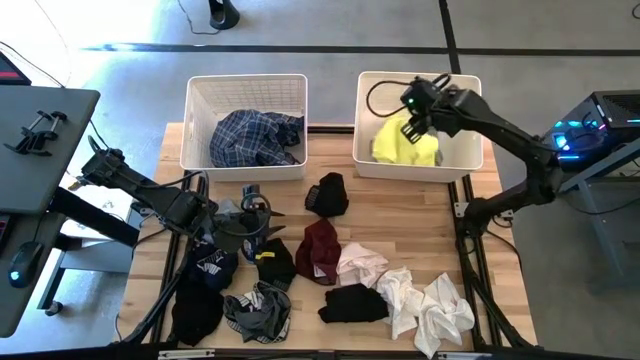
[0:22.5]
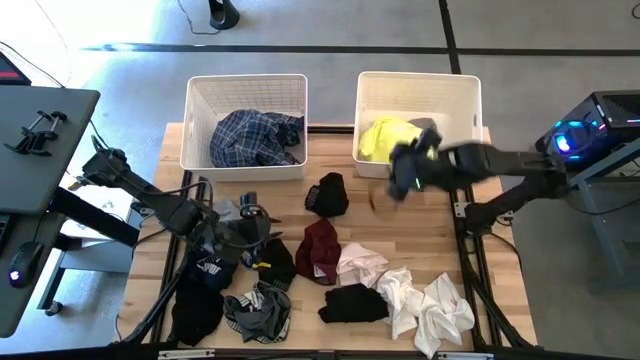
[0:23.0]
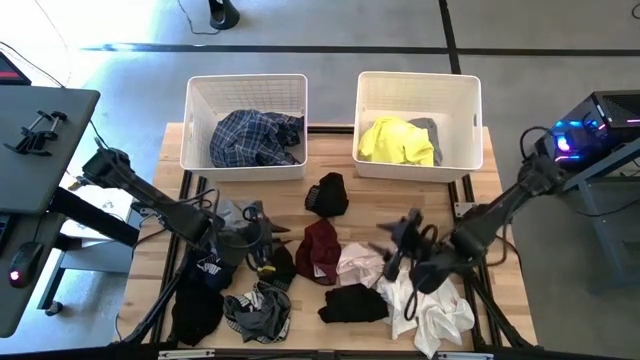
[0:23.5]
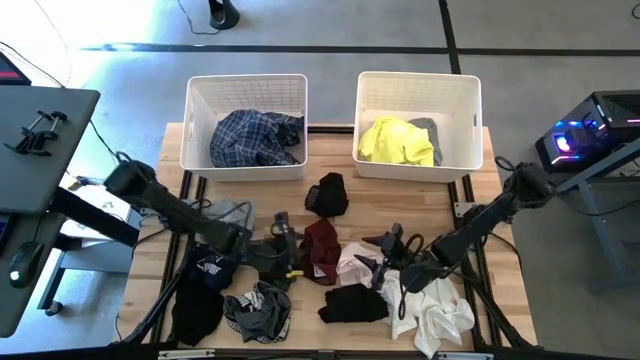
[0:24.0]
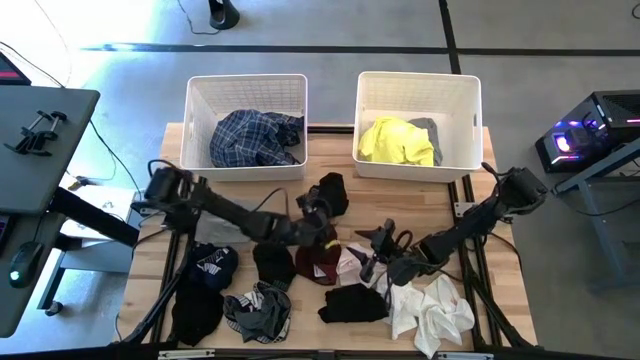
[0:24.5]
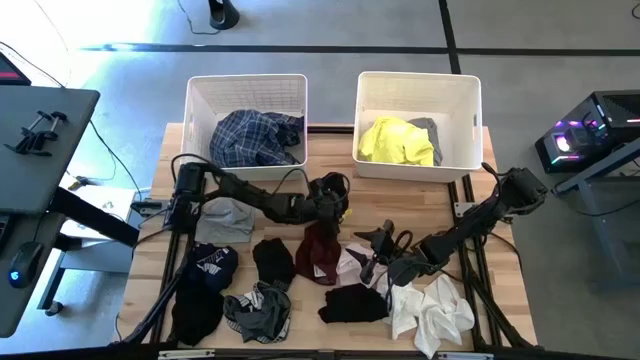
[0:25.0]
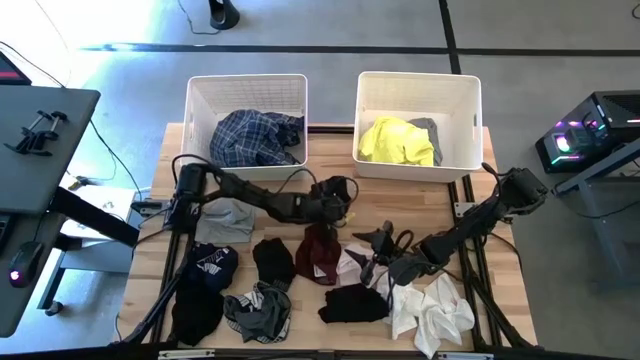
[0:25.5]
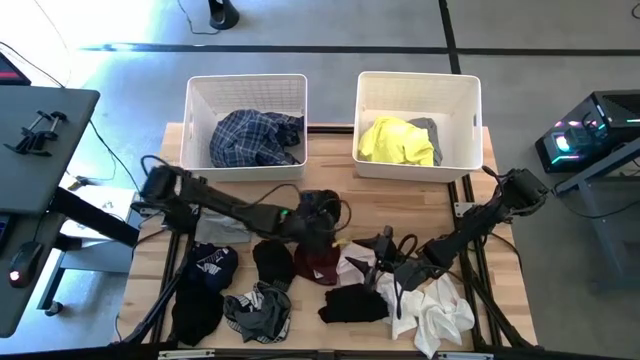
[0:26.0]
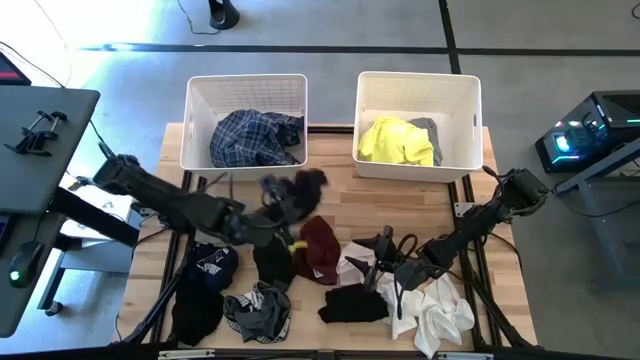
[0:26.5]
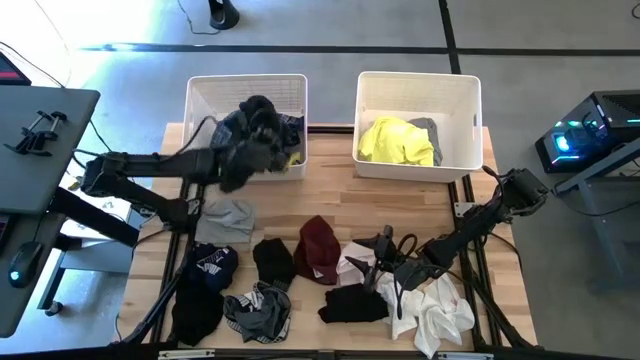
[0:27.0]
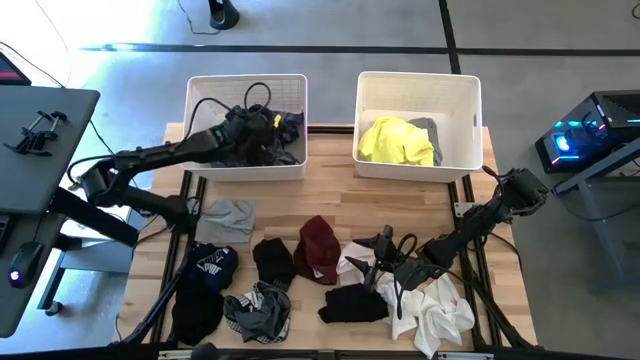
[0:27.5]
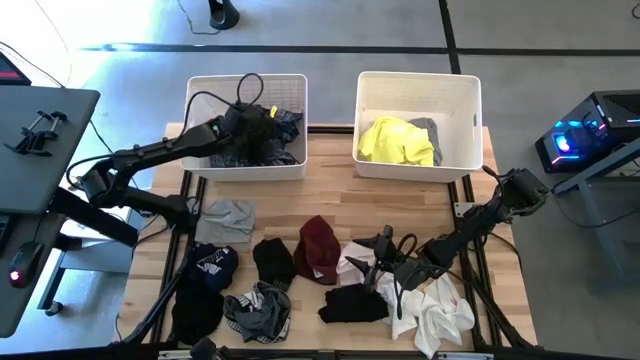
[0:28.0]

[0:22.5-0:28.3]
Task: Sort clothes
Put the top black boxer shorts into the left white bin

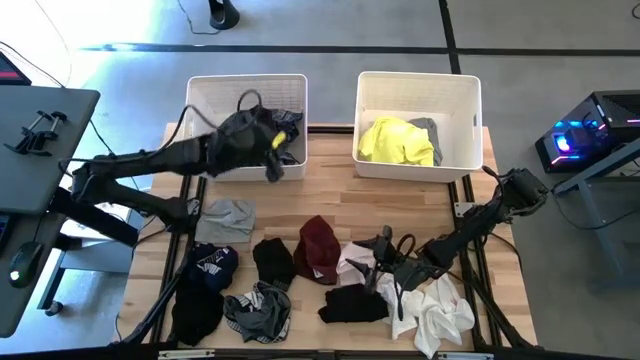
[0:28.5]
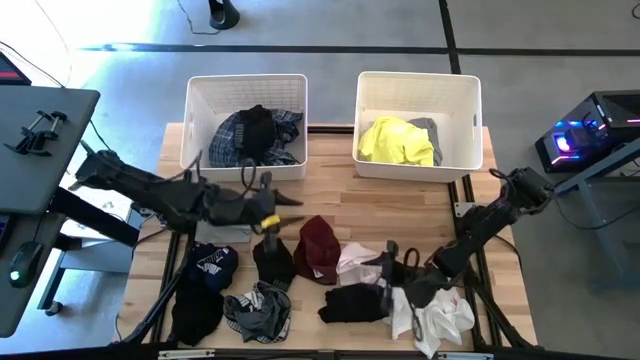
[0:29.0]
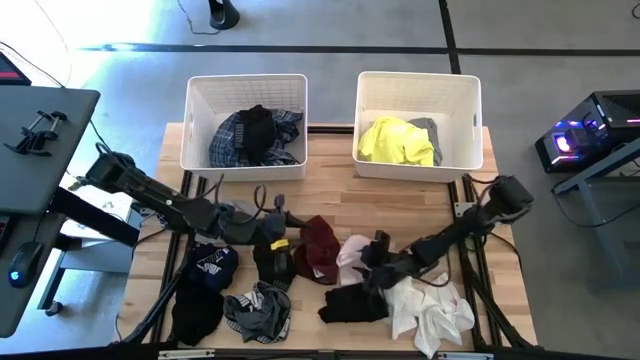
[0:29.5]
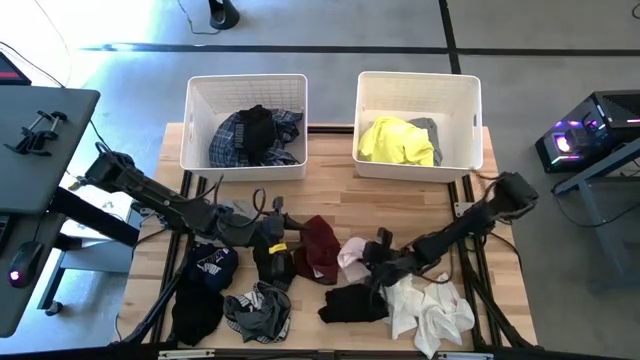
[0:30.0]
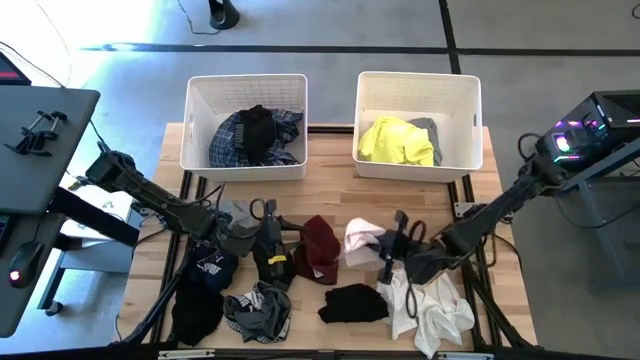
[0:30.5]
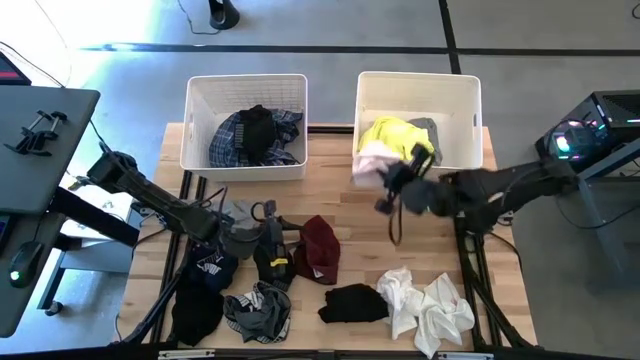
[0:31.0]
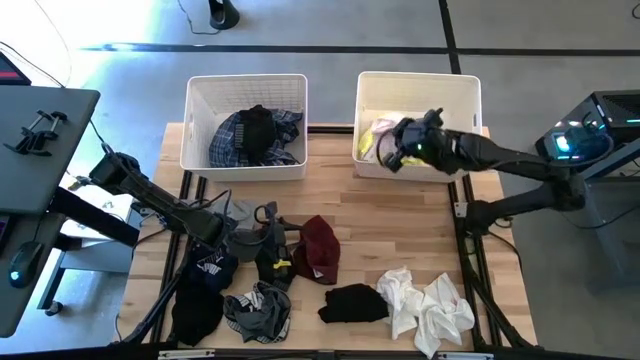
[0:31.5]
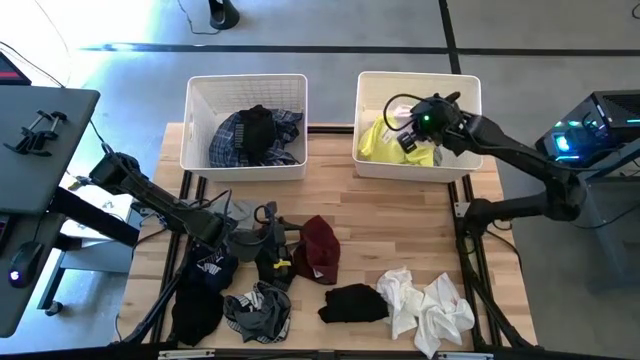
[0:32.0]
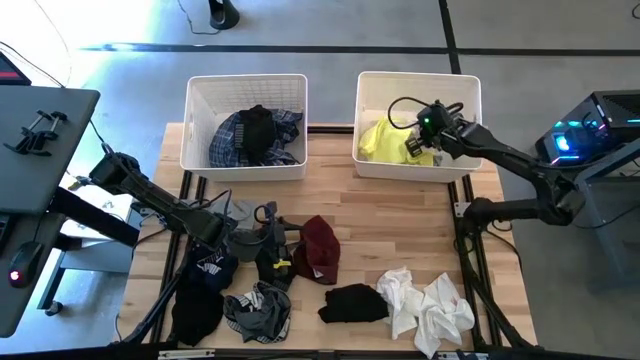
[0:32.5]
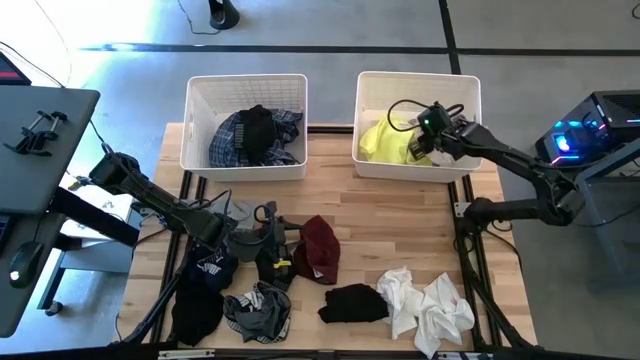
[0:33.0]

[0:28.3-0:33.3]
Put the light pink underwear into the right white bin

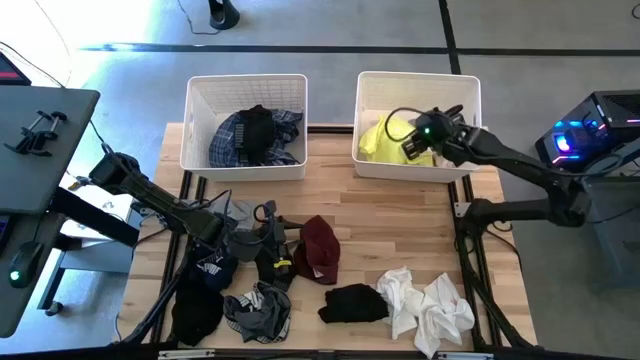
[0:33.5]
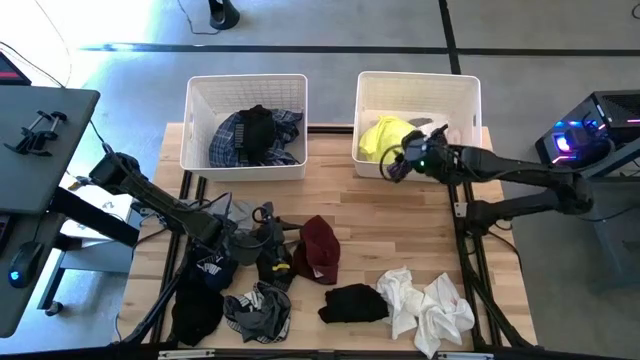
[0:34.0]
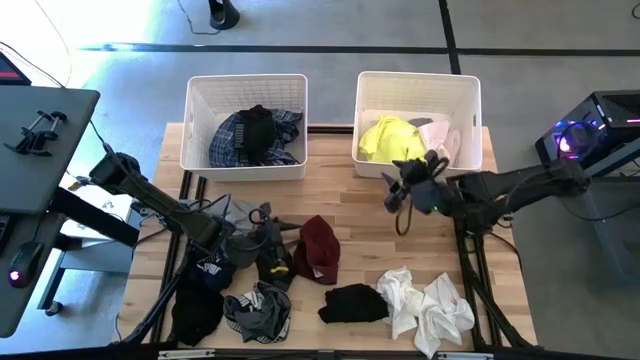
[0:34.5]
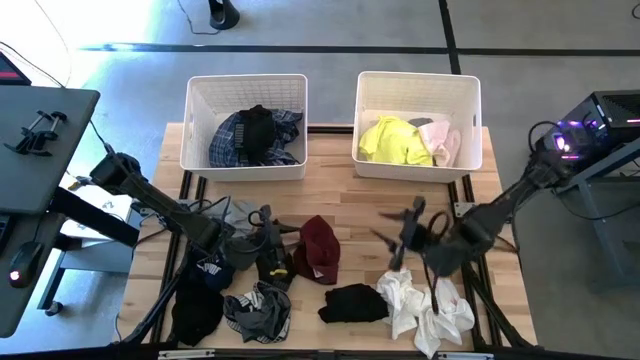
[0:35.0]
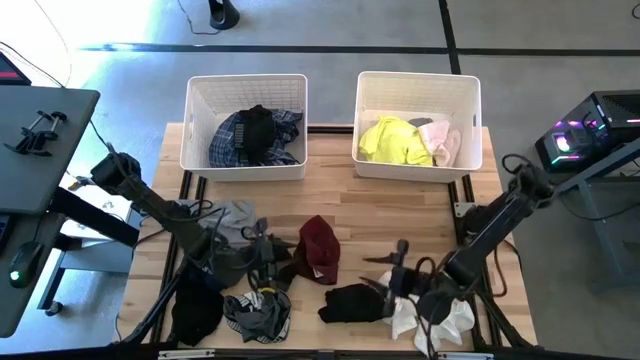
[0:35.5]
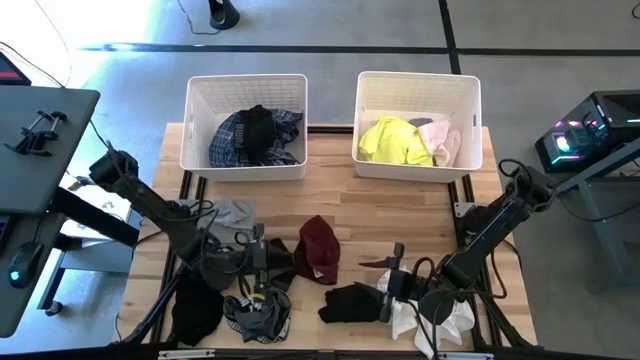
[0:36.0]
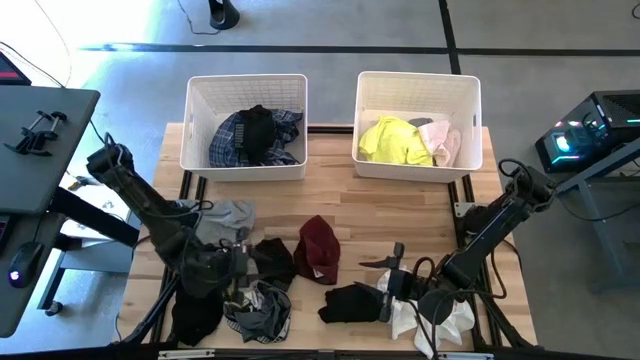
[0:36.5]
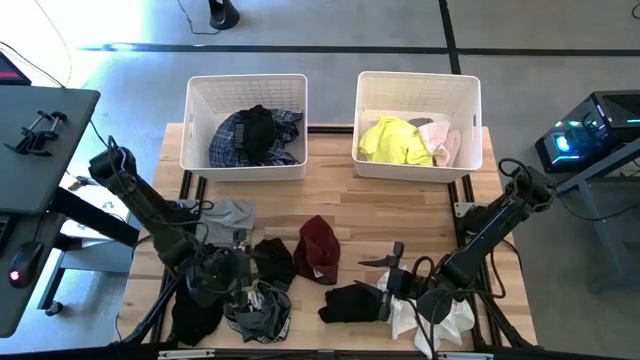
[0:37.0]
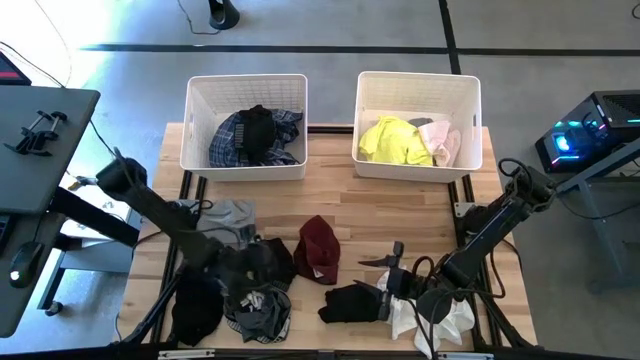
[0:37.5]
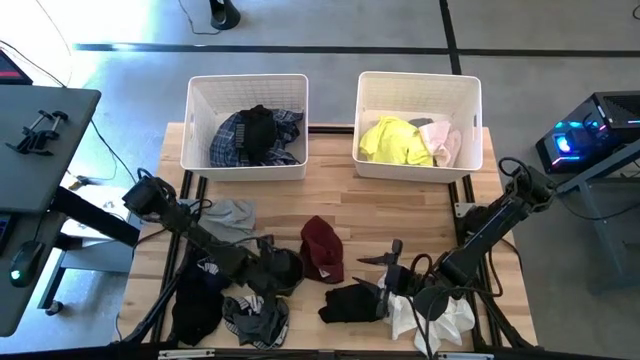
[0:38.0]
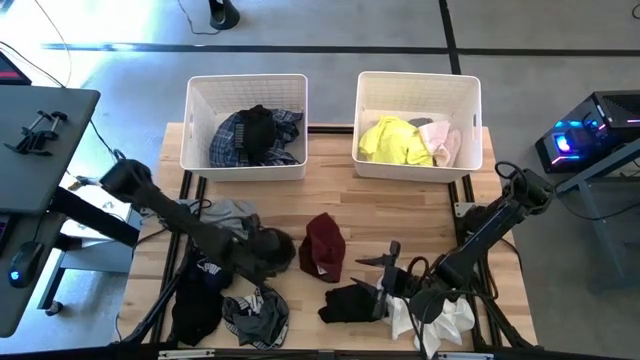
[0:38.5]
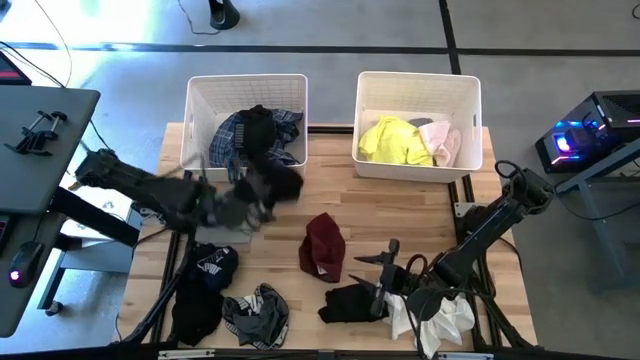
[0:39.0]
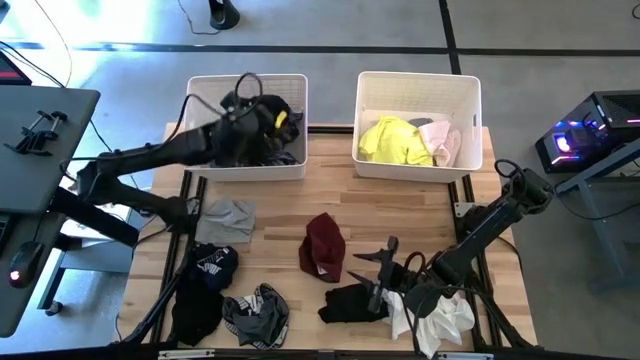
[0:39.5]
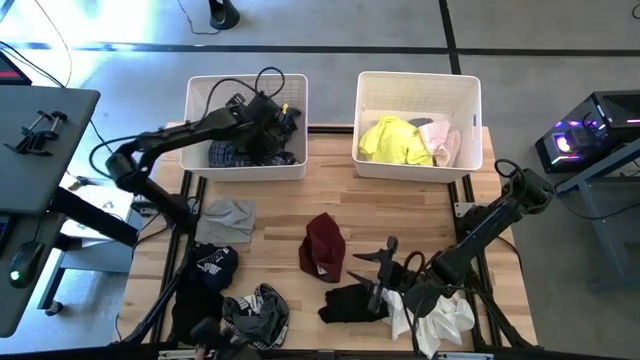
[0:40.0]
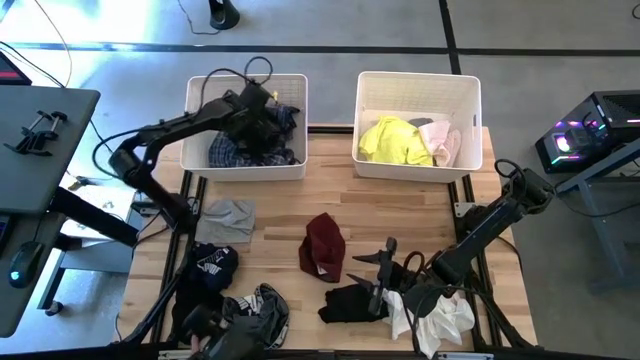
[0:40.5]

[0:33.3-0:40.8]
Put the bottom black boxer shorts into the left white bin

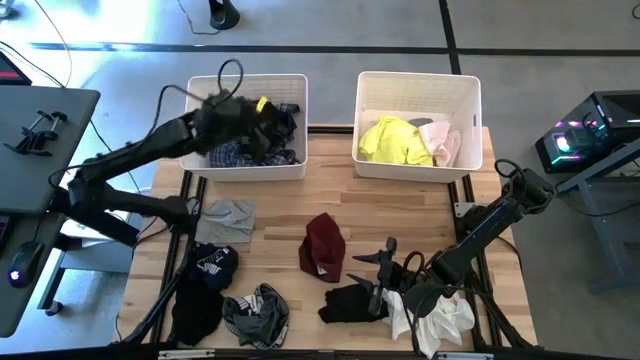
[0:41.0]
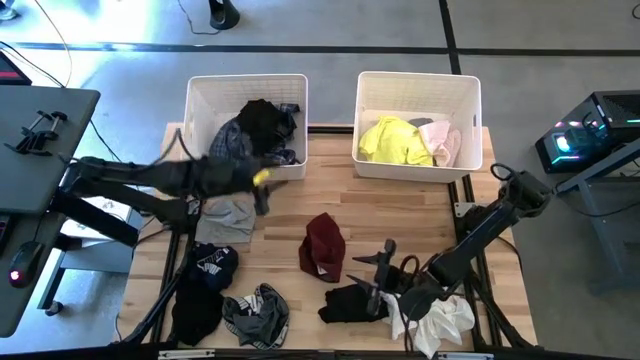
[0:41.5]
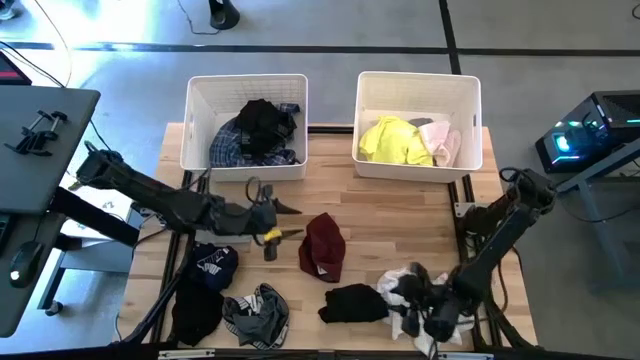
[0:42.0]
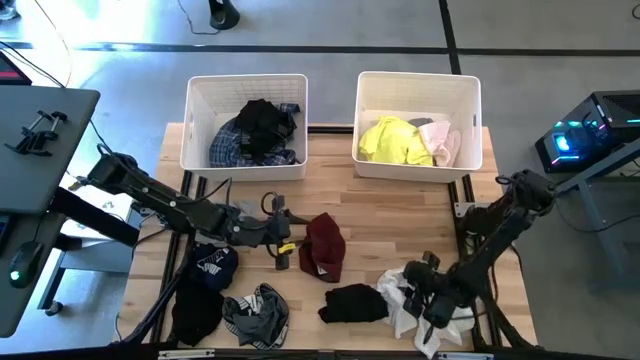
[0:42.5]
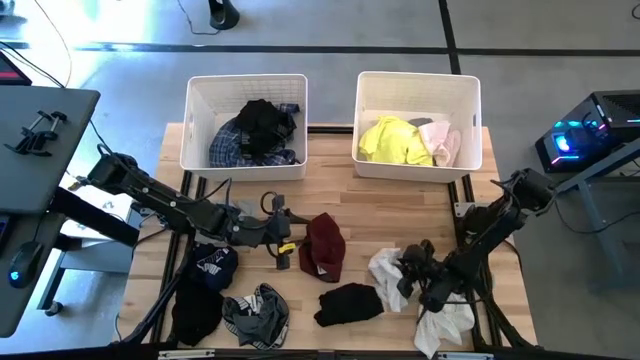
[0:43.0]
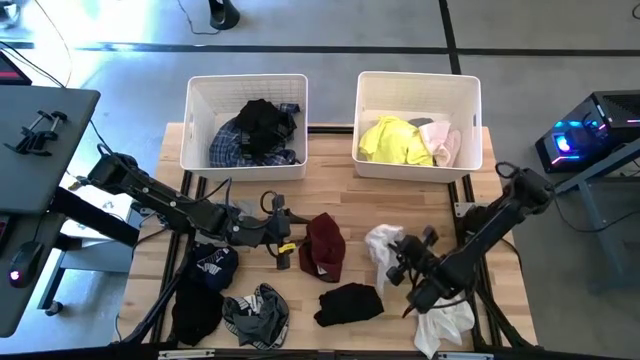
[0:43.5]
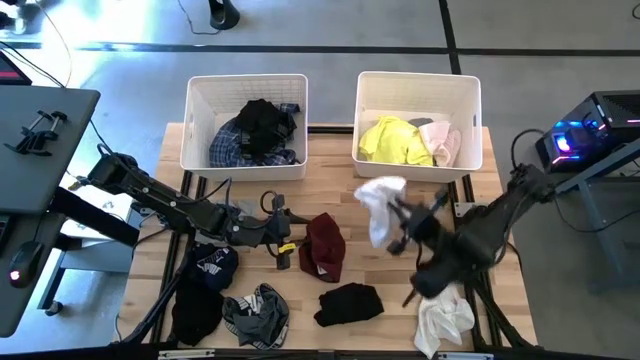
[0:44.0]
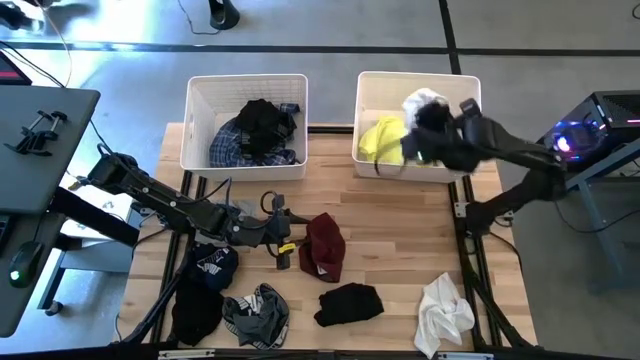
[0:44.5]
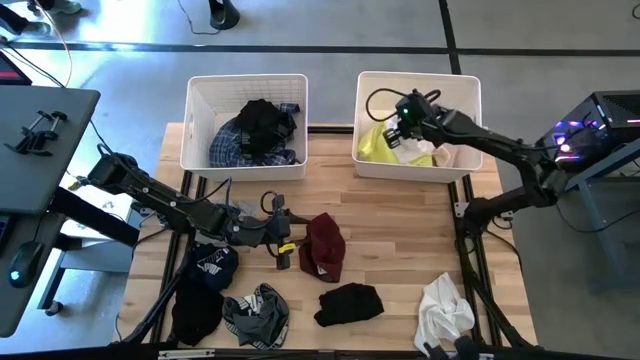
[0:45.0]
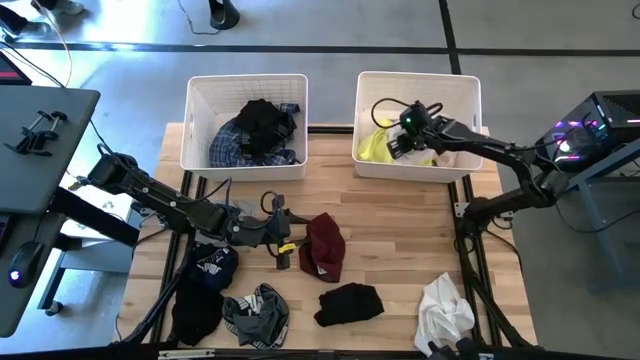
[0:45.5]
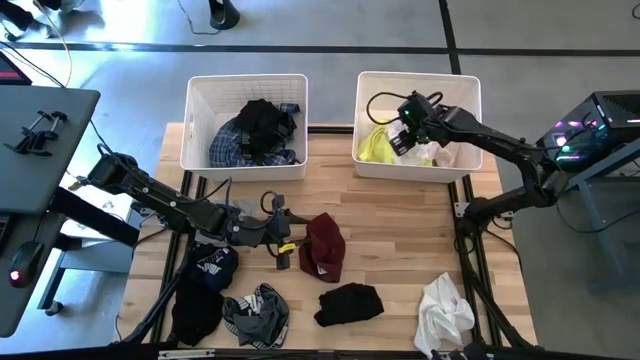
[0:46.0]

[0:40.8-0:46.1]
Put the left white shorts into the right white bin
